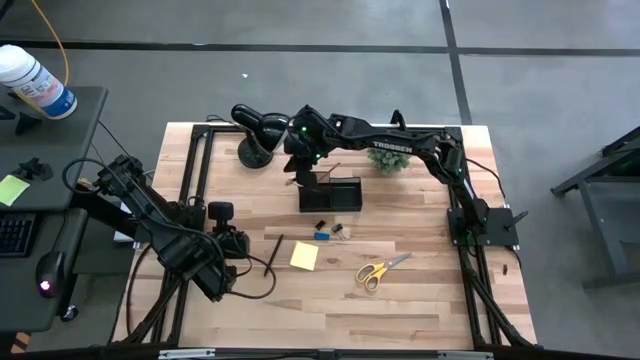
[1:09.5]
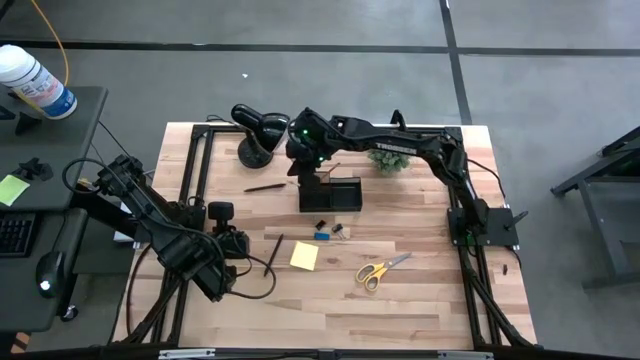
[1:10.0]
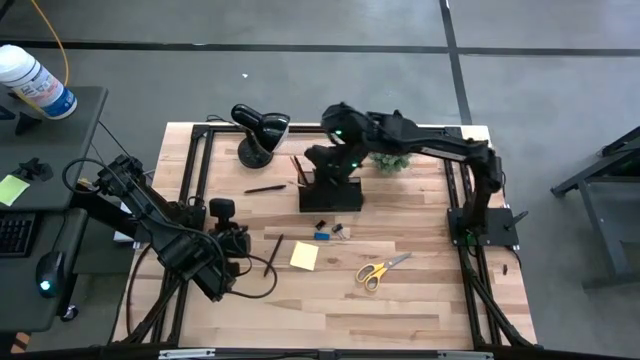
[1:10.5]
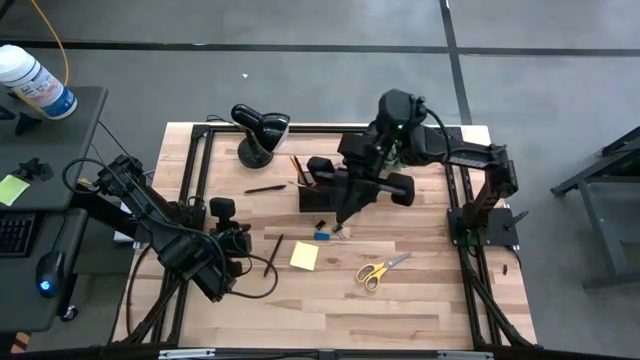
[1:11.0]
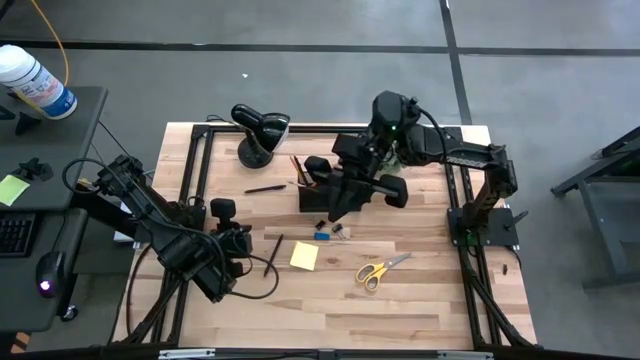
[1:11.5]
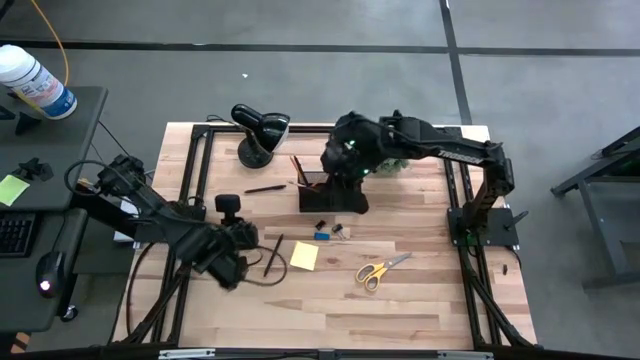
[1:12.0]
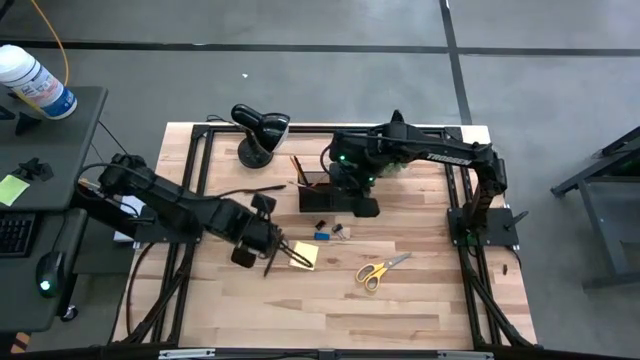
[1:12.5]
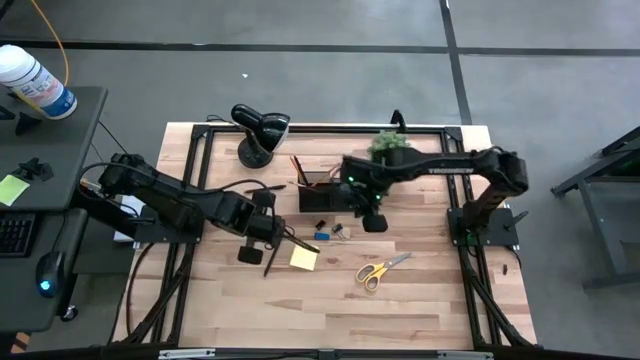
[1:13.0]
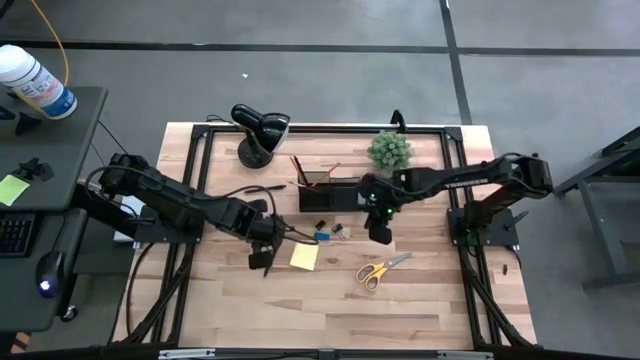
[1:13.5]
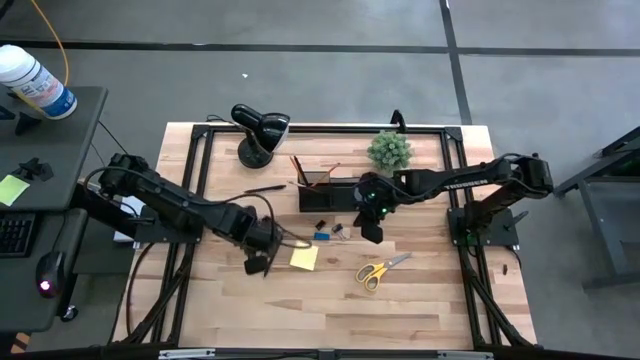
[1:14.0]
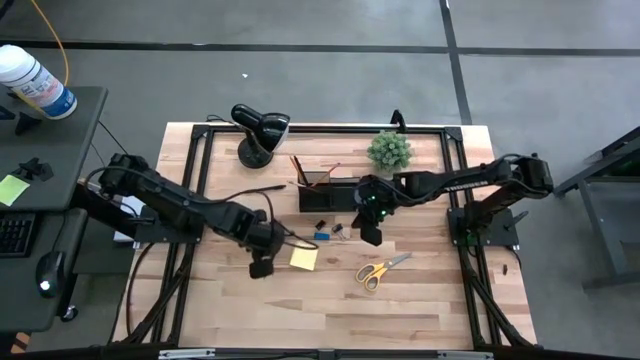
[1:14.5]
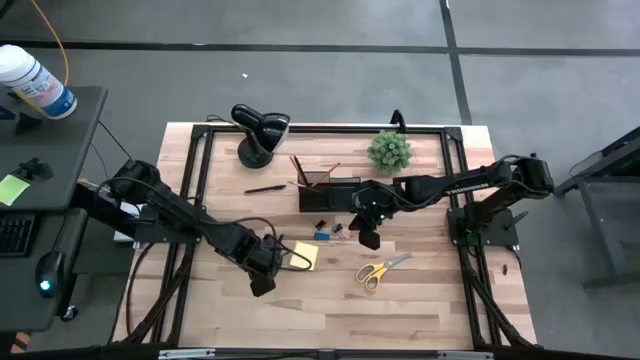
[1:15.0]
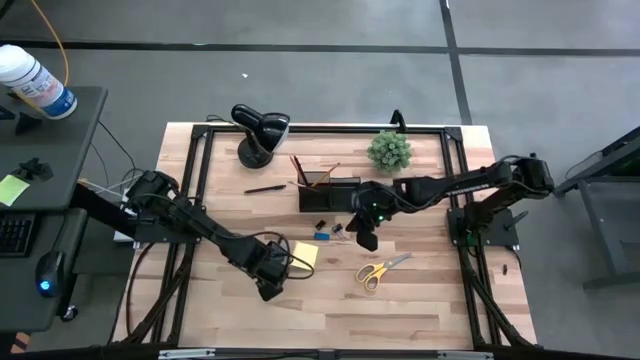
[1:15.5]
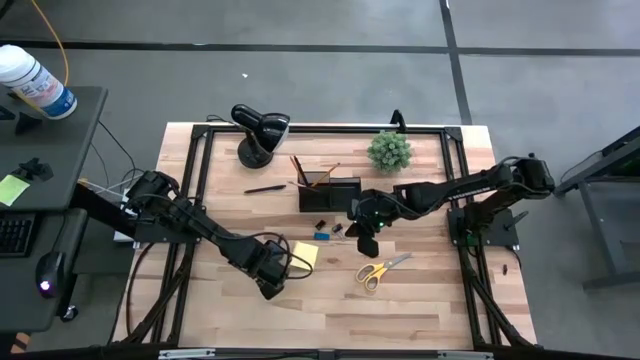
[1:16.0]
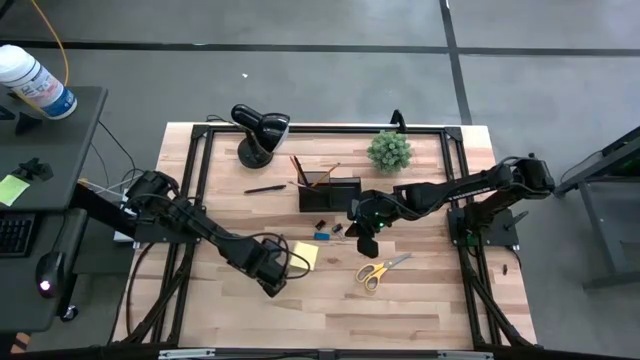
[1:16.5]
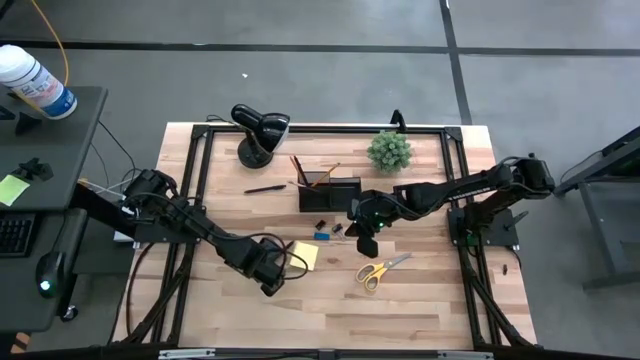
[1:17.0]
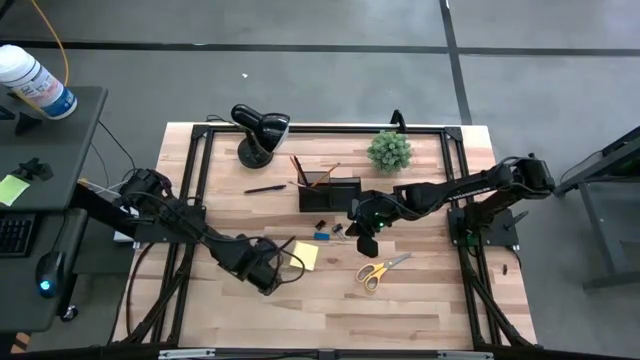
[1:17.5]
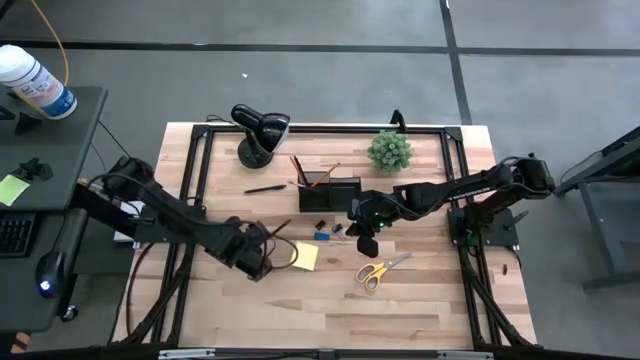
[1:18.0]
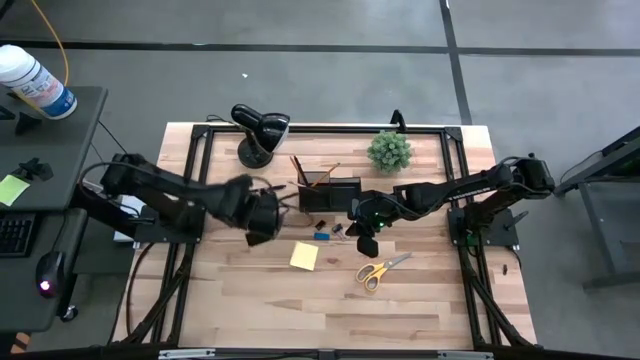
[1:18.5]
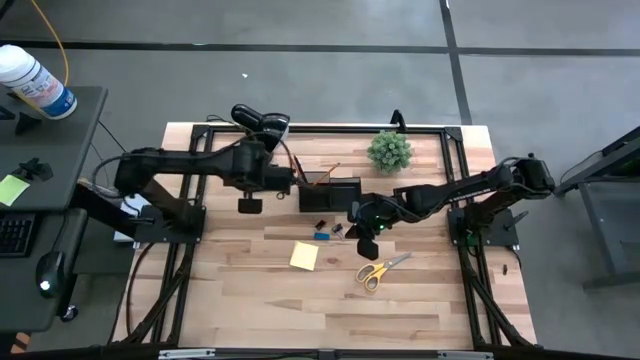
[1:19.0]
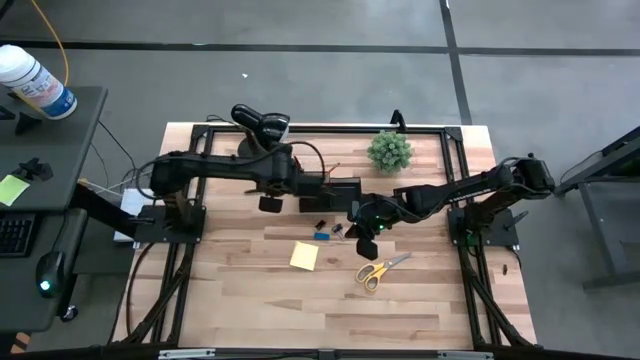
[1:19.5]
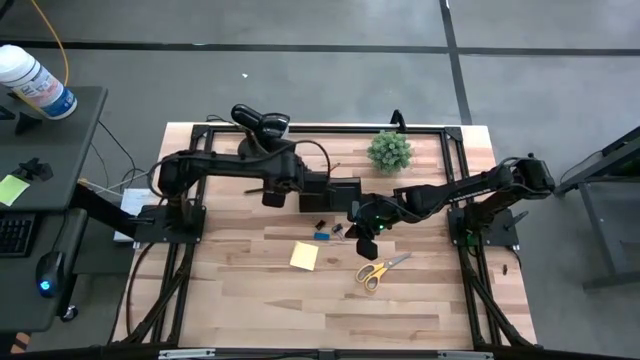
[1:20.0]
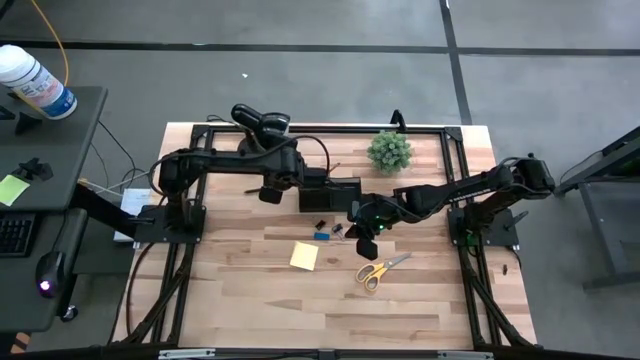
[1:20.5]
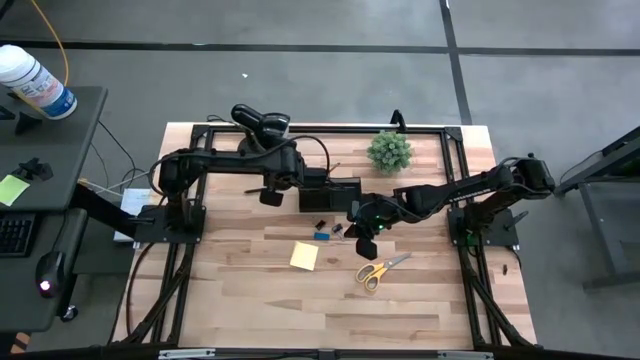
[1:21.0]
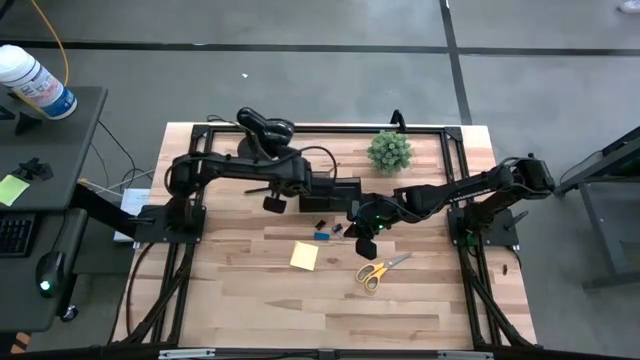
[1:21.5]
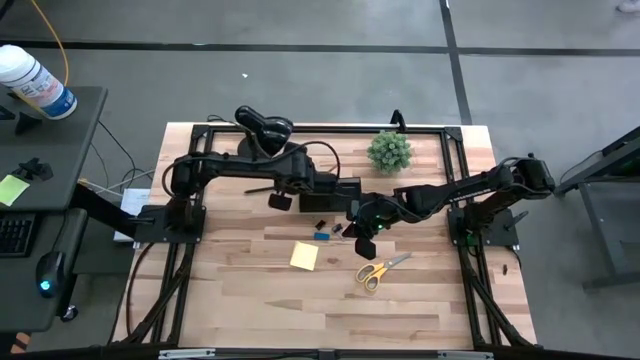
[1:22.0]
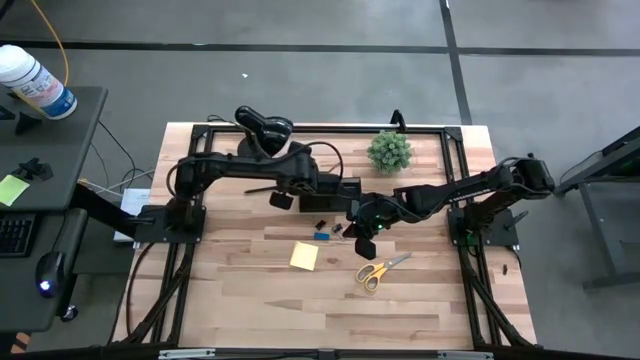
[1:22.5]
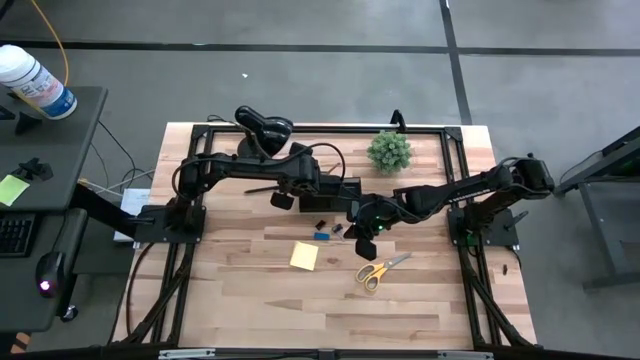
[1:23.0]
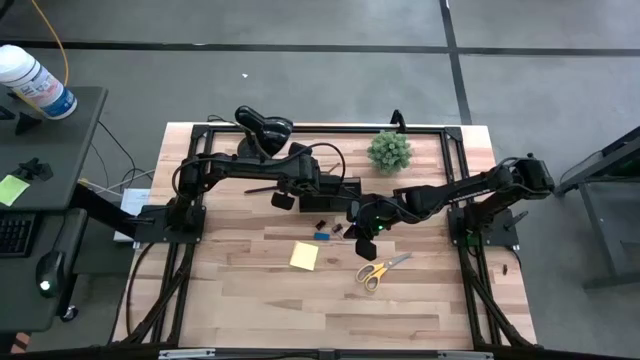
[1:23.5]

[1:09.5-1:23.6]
Task: Pick and place office supplies into organizer
Put the bottom black pen into the black desk organizer

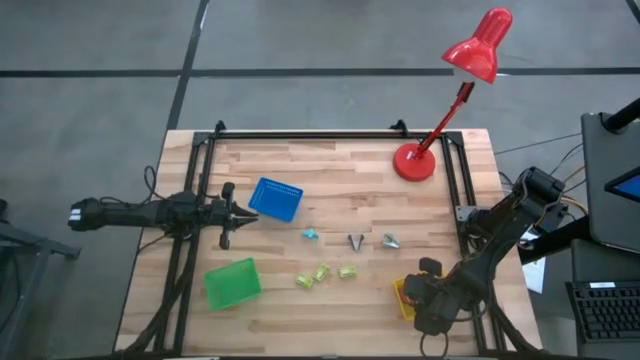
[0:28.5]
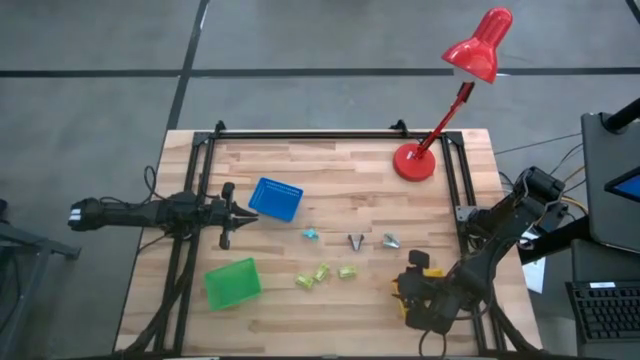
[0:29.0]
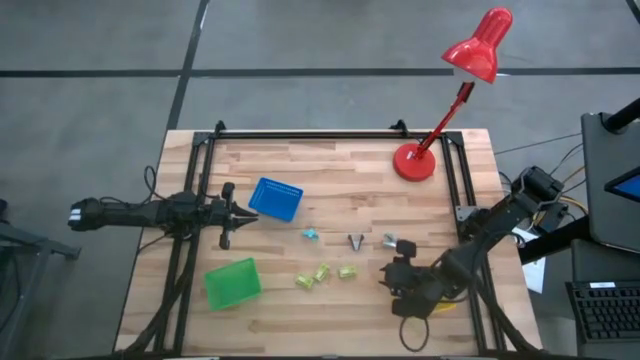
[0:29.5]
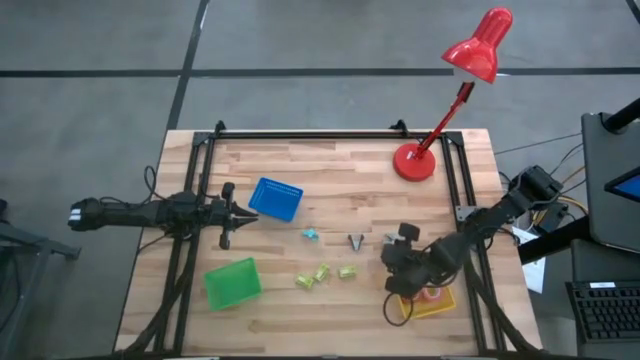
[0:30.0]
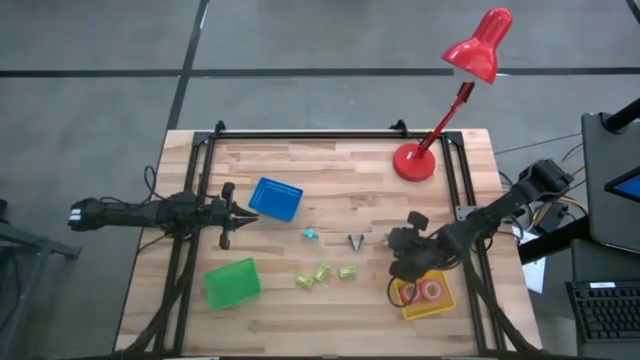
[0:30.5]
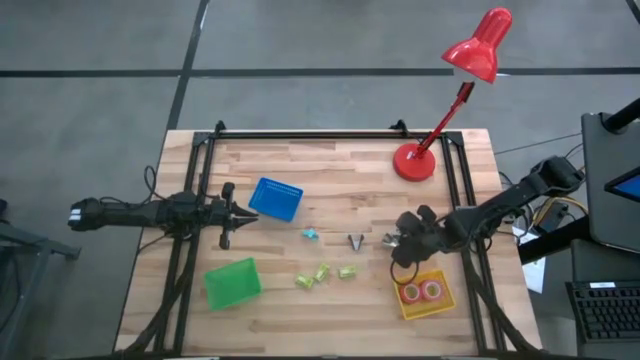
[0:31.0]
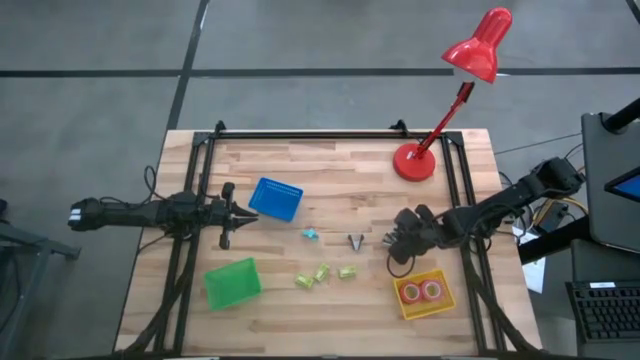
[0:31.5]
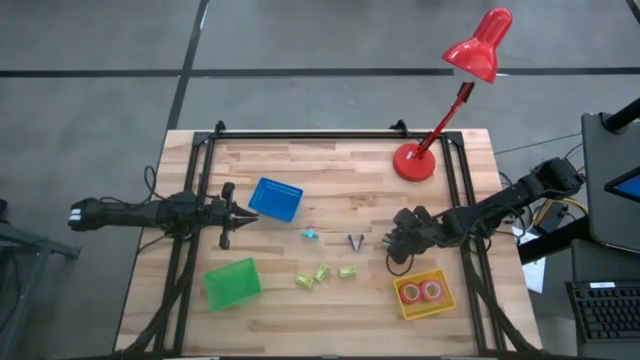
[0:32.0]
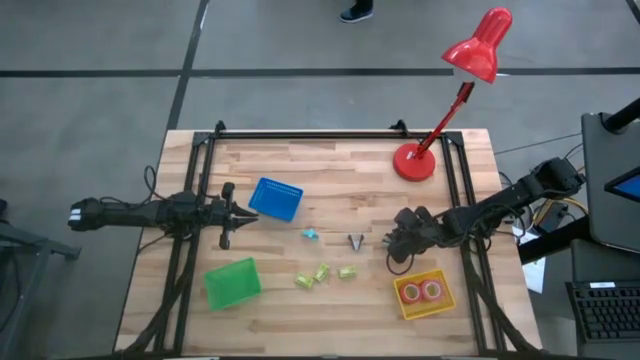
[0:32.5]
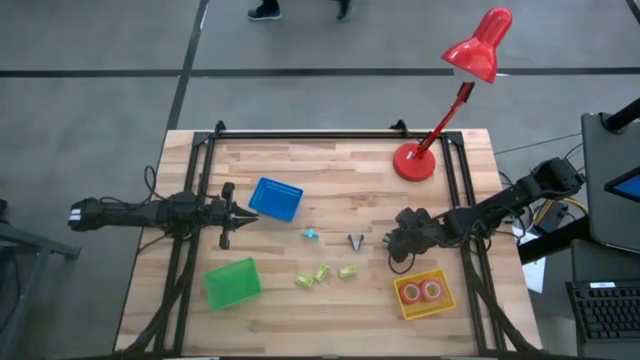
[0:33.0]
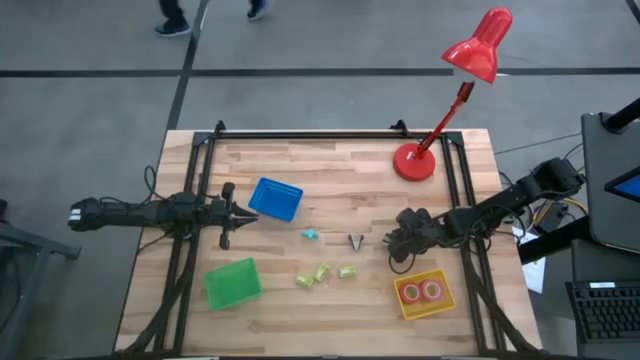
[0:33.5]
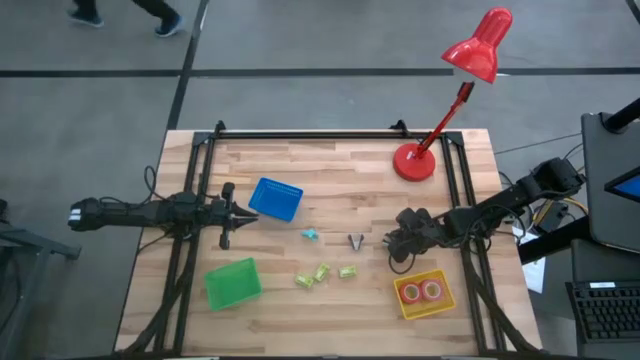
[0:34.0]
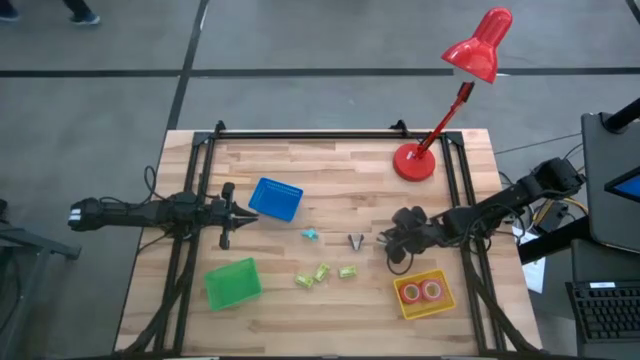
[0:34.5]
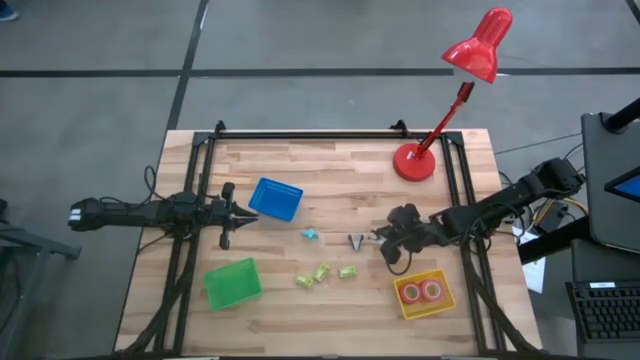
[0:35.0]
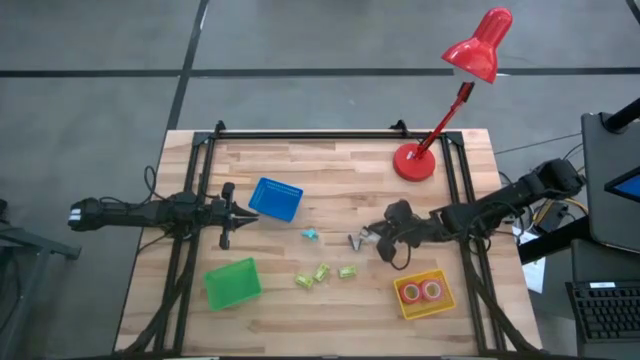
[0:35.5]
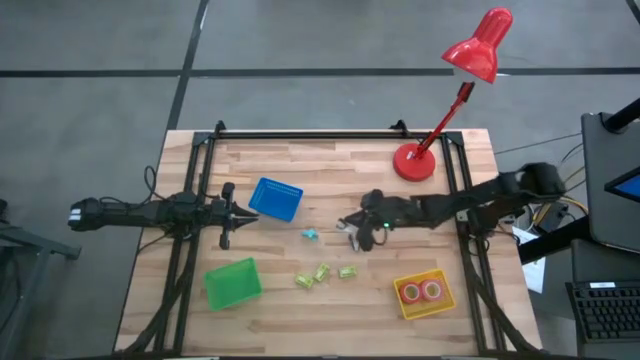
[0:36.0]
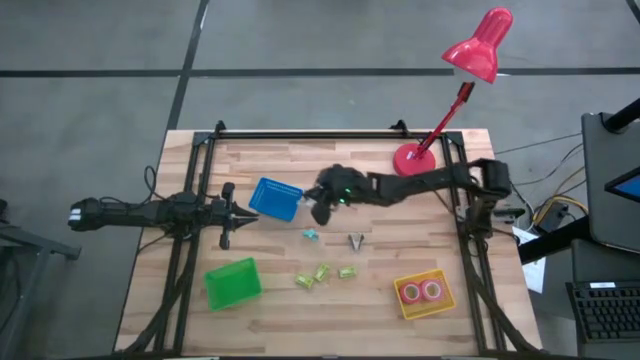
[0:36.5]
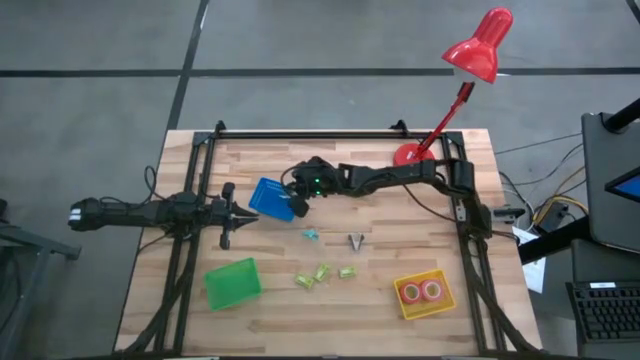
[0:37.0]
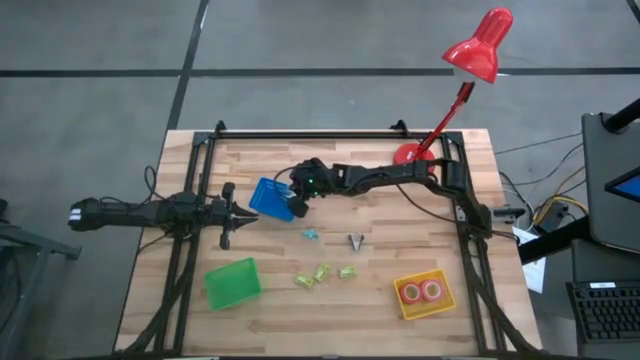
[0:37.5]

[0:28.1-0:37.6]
Task: Pick and place Stapler, Stapler remover, tape
Put the right light blue staple remover into the blue bin
